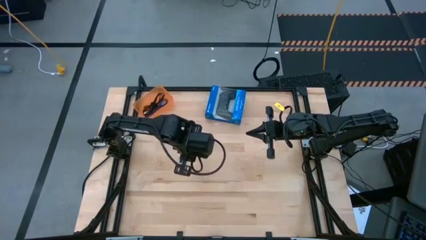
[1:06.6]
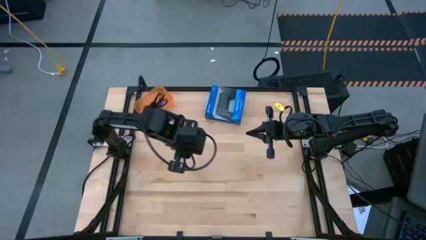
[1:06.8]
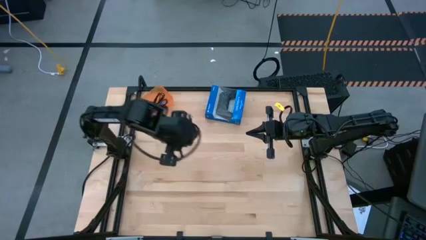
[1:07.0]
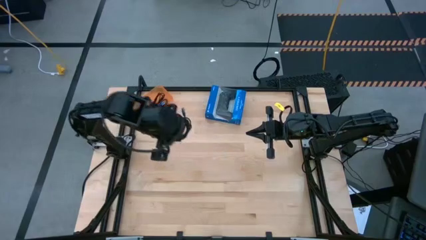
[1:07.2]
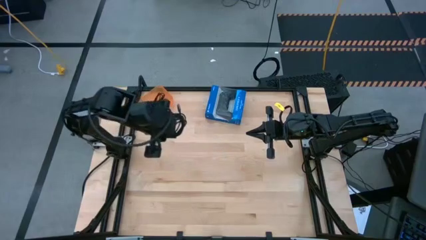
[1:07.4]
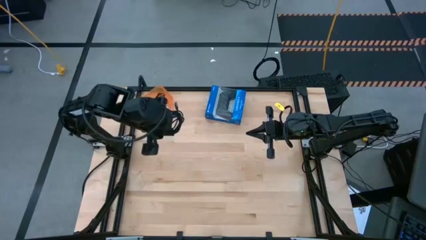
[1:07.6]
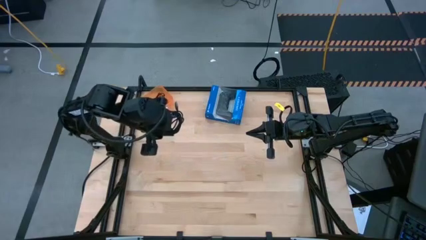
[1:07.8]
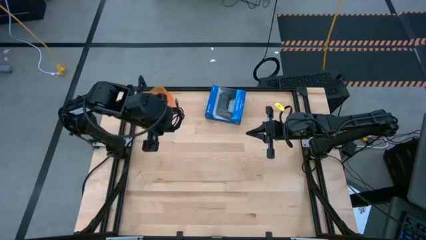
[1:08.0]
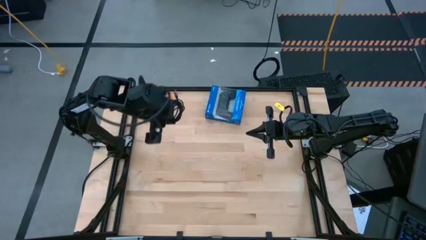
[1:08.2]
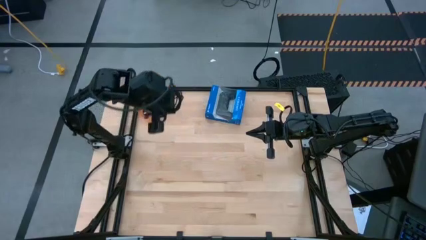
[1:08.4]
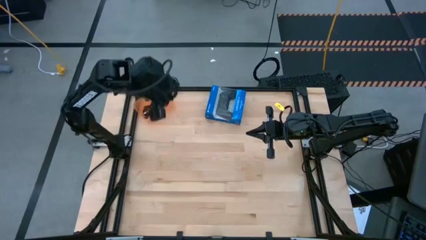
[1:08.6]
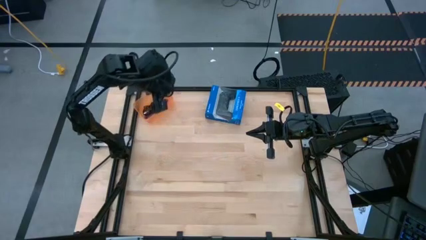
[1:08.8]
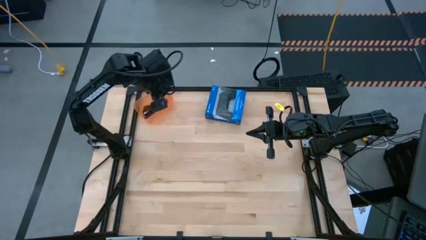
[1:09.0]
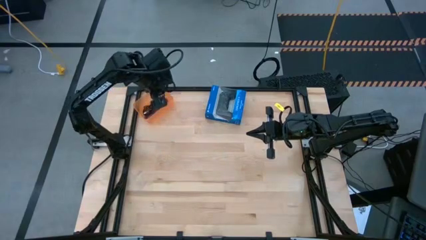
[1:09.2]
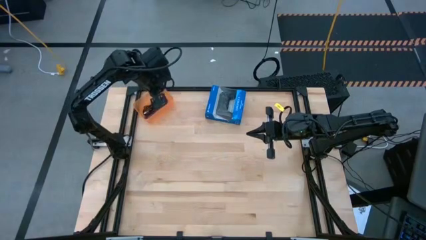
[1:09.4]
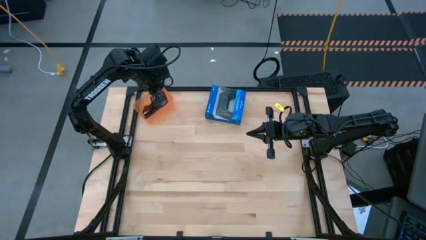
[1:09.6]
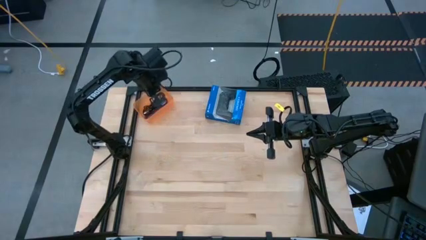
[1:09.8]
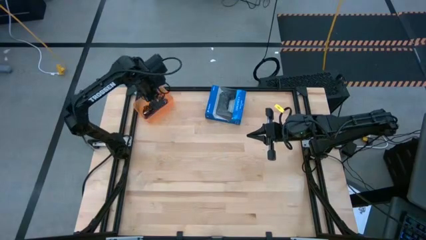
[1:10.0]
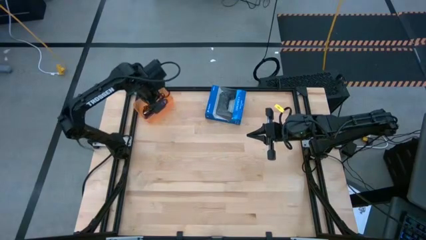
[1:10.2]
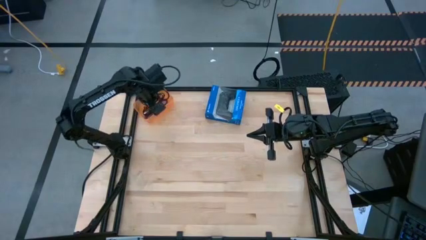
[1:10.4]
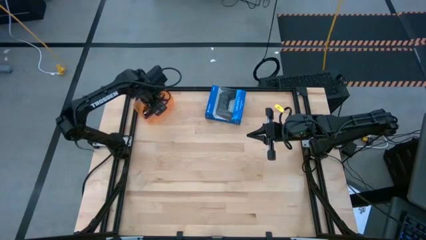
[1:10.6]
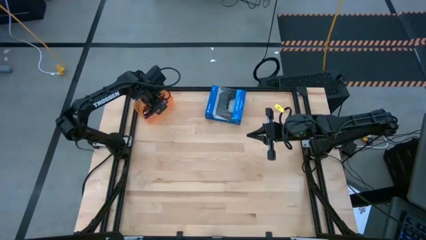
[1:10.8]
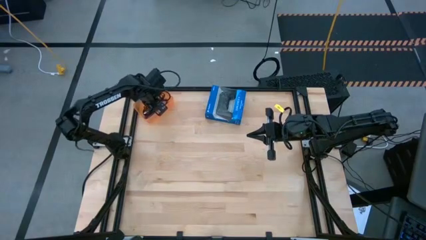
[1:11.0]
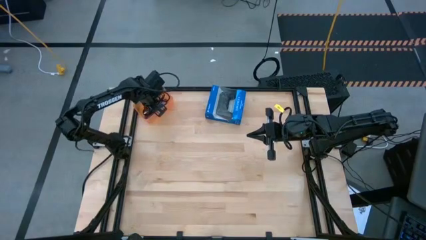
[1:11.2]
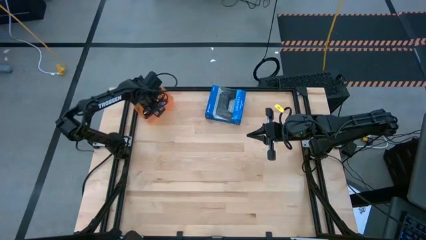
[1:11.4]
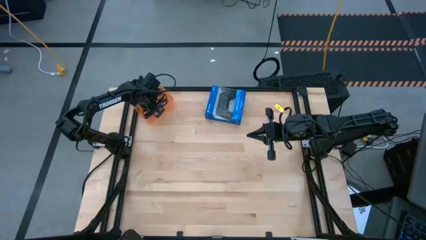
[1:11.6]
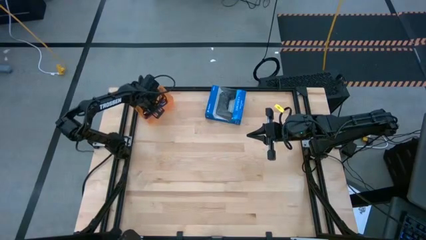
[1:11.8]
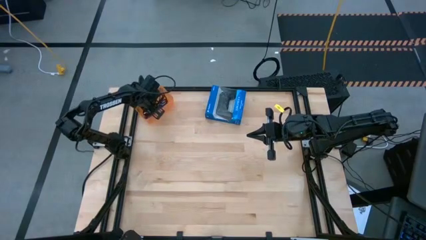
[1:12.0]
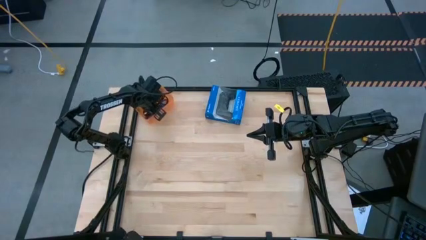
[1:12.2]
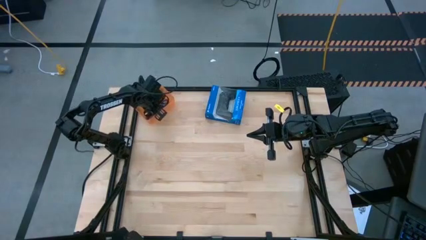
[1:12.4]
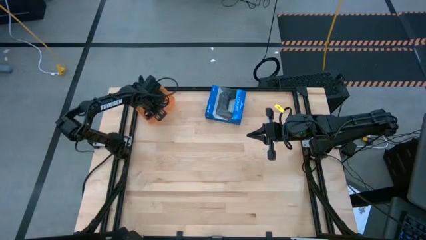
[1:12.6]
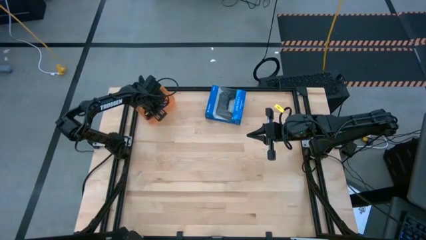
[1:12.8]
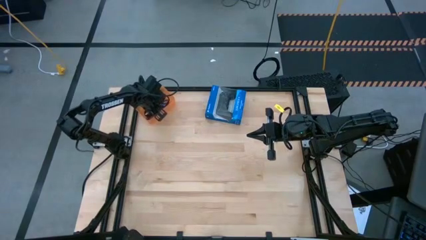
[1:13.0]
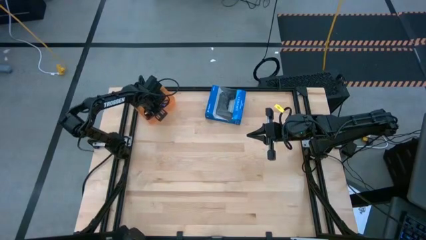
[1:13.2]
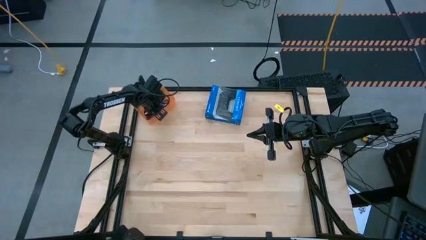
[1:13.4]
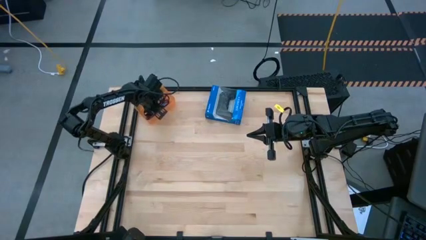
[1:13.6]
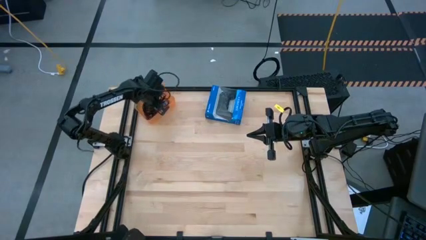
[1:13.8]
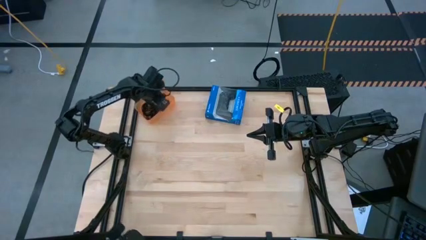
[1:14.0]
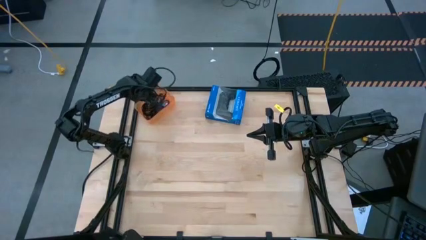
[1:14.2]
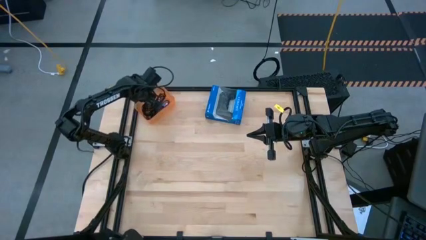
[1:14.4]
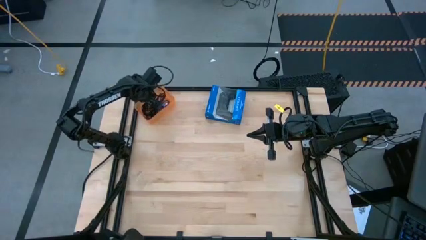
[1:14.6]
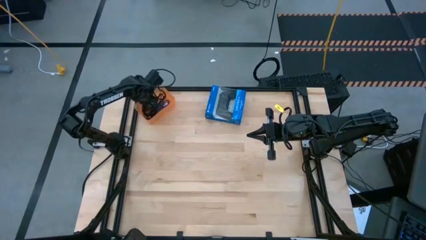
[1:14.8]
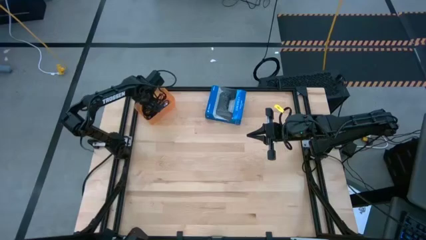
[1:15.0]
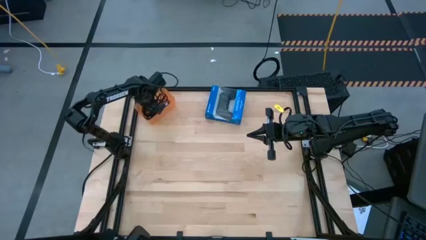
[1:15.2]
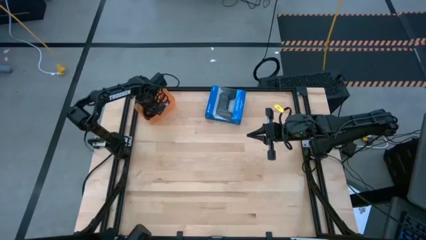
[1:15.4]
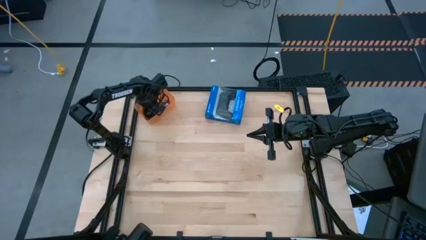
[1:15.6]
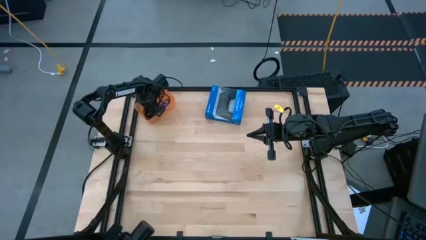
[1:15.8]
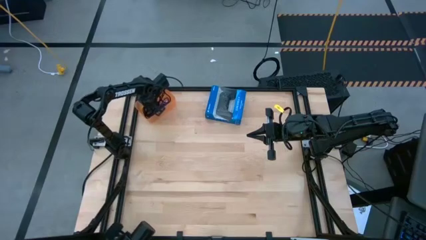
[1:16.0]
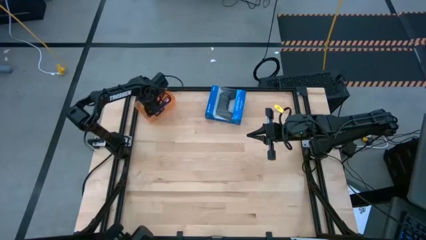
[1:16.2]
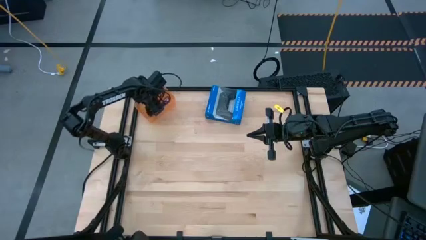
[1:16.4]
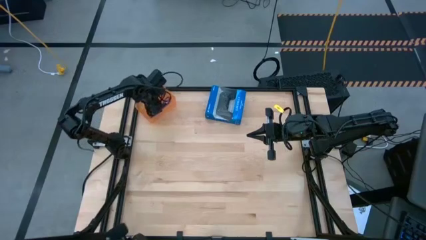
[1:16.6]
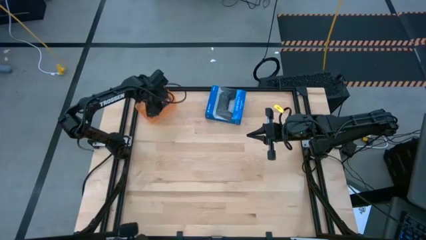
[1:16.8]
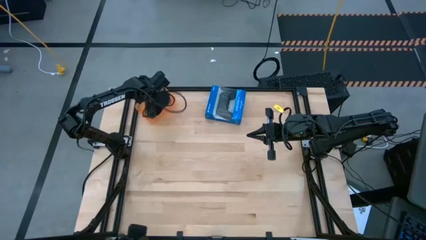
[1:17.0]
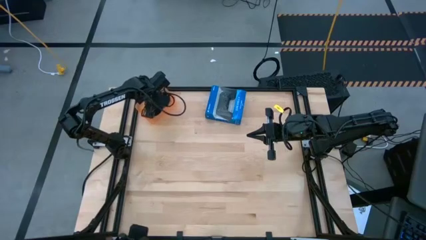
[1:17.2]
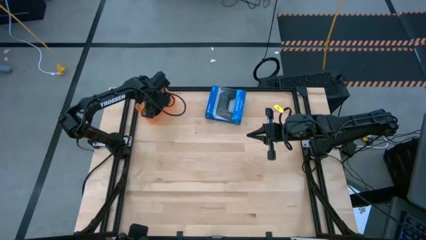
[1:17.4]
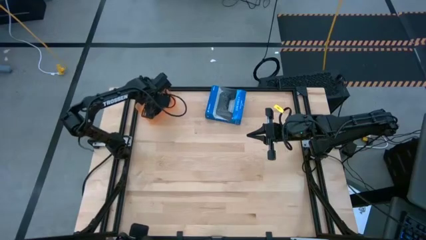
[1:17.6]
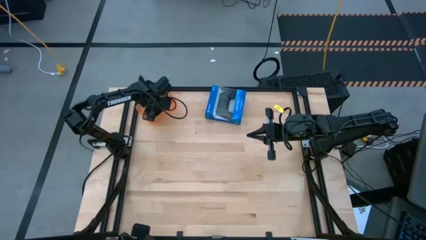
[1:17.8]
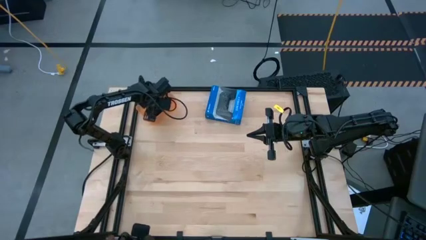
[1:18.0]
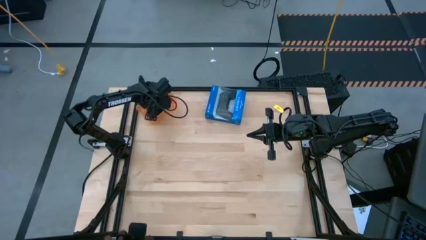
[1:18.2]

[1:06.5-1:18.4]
Task: Pick and place USB-C Cables
Put the black charger cable into the orange bin

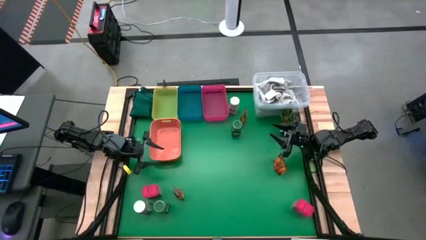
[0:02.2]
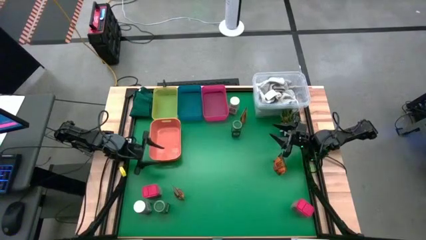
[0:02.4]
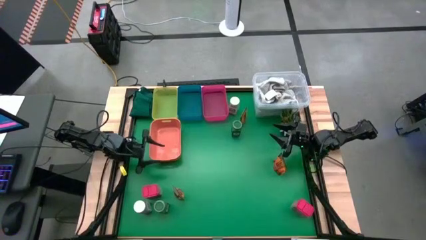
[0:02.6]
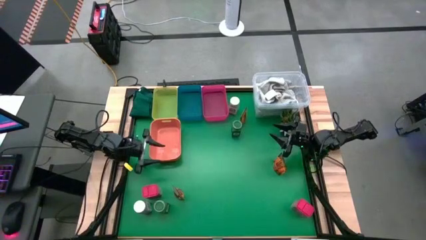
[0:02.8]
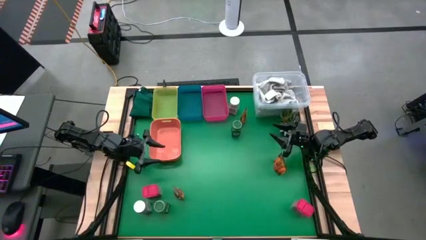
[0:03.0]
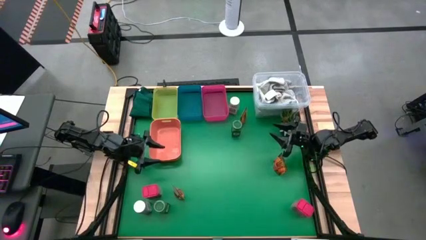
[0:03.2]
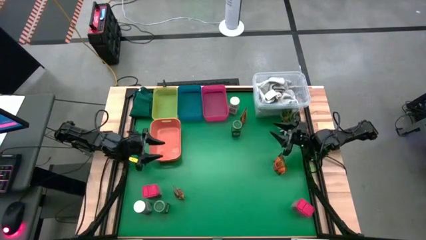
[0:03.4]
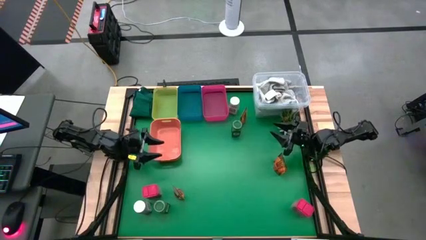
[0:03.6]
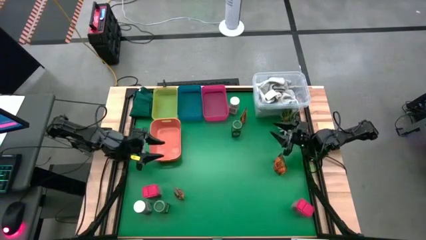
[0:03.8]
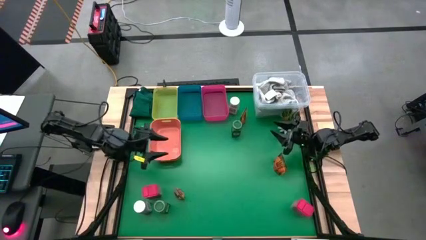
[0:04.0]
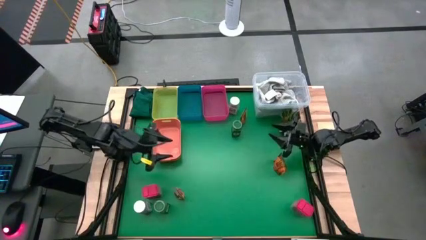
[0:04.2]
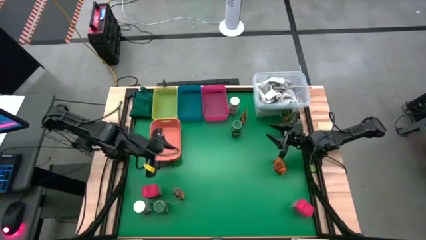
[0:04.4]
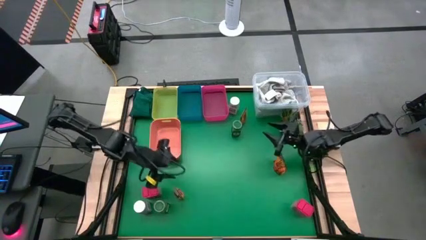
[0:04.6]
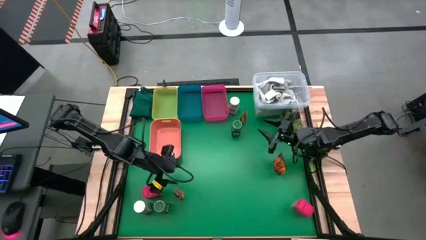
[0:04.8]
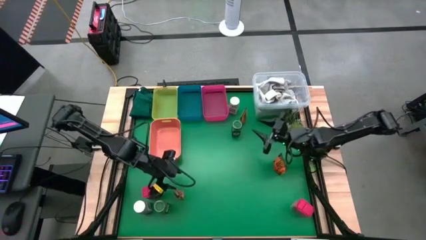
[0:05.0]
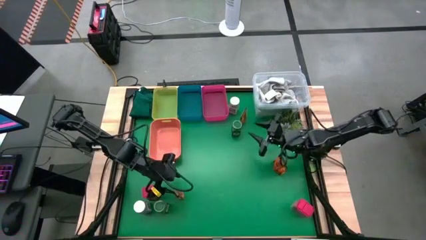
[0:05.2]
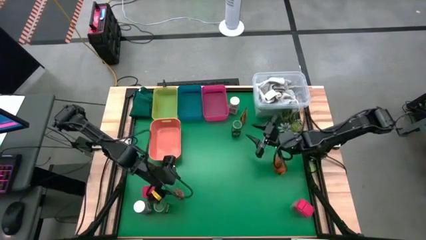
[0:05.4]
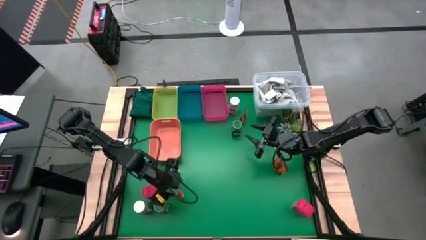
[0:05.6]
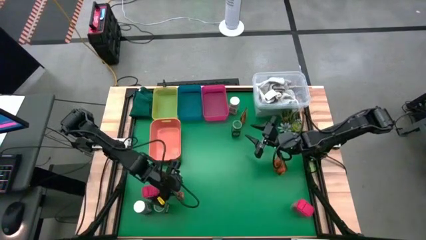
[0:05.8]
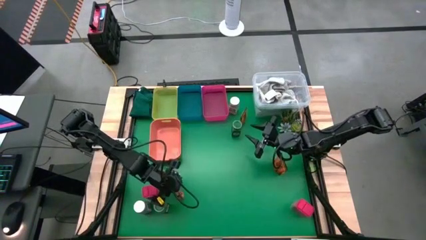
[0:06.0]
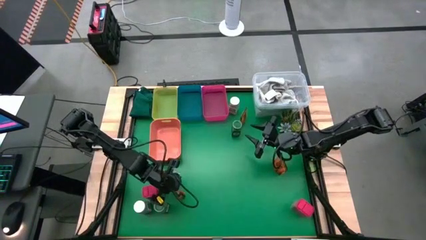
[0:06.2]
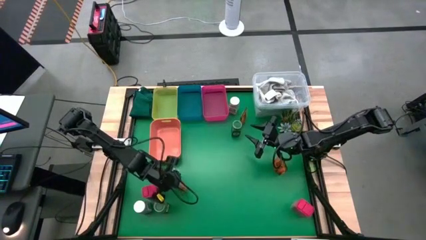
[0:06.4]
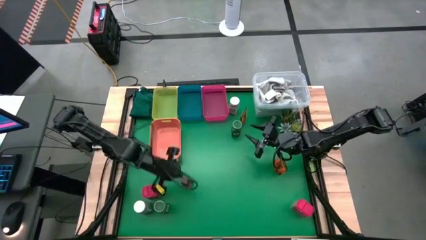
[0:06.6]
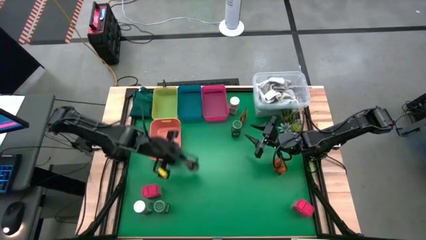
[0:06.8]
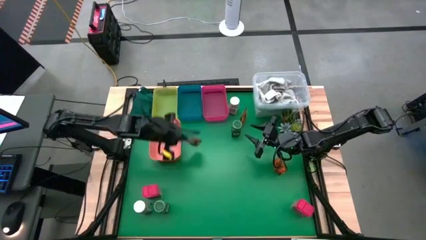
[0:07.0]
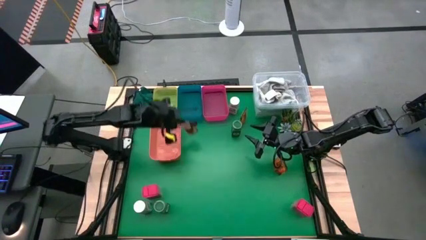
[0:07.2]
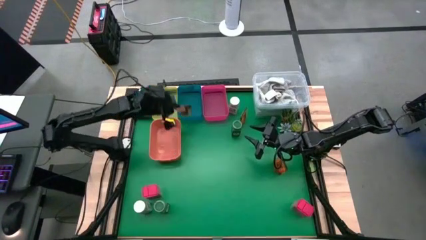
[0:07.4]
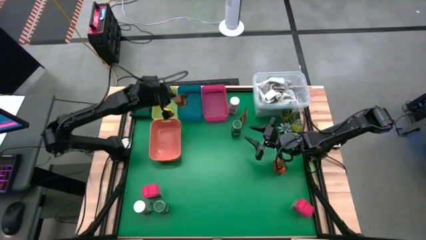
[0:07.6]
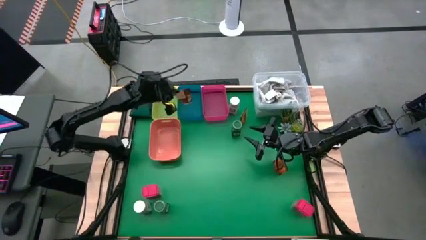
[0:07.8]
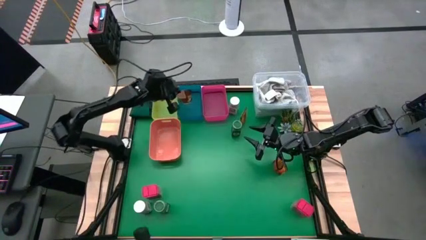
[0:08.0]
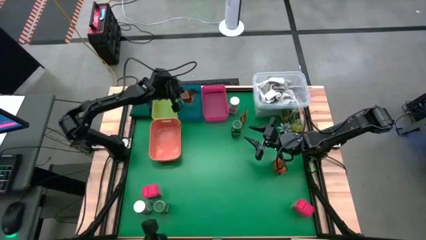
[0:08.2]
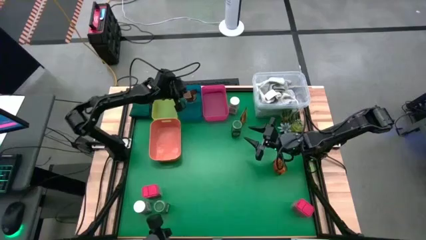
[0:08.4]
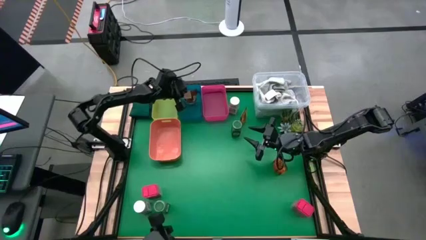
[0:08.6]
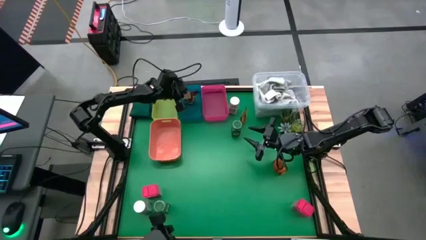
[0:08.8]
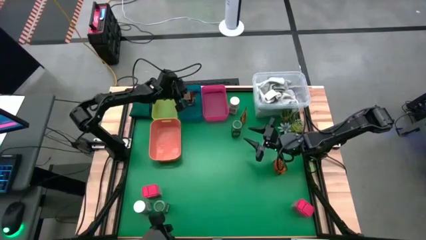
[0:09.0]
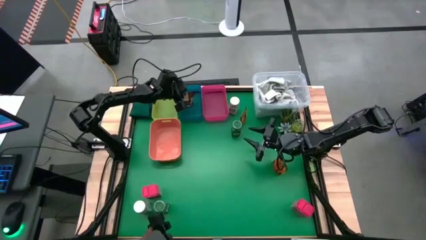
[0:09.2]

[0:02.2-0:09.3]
Task: Sort spices by type
Put the bottom orange spice bag into the blue bin
